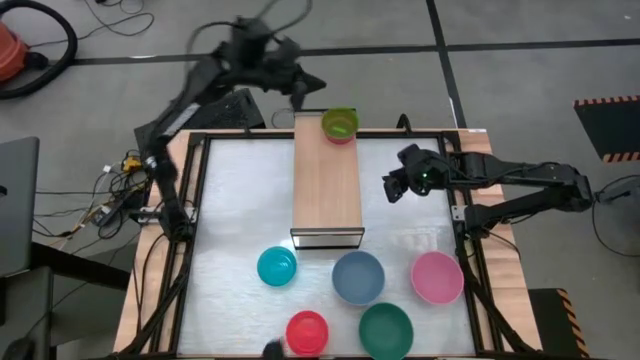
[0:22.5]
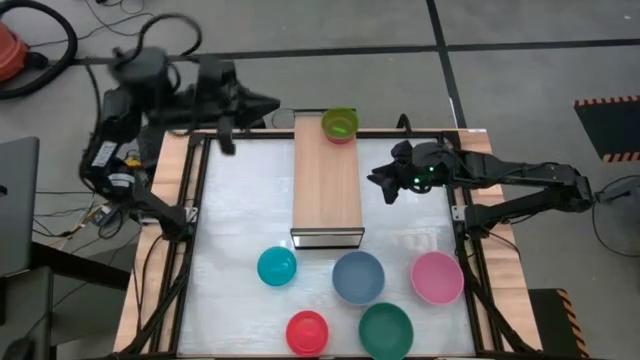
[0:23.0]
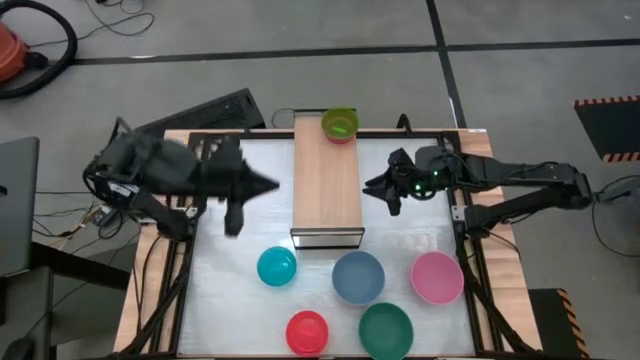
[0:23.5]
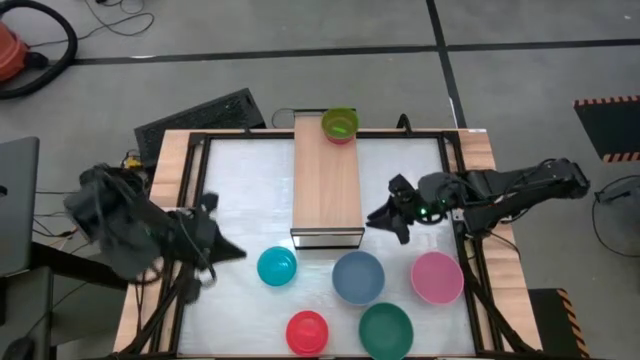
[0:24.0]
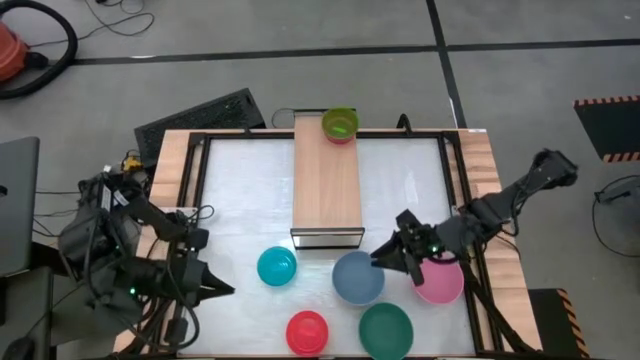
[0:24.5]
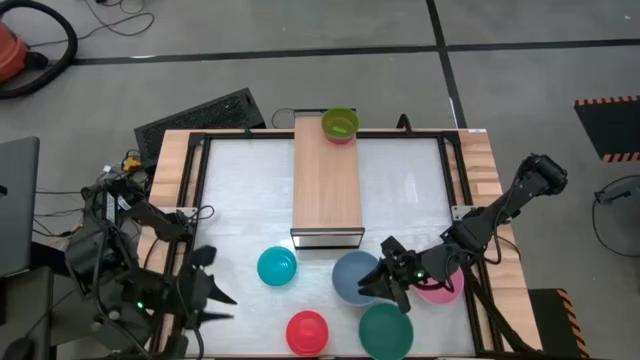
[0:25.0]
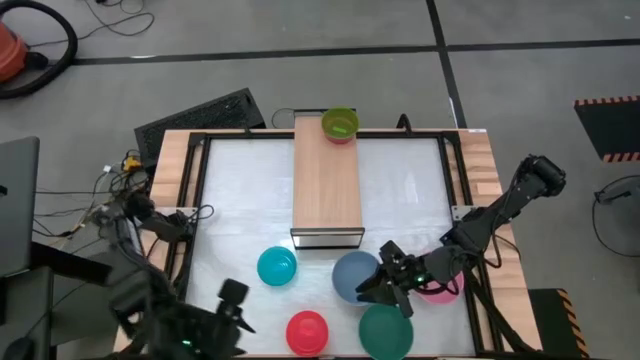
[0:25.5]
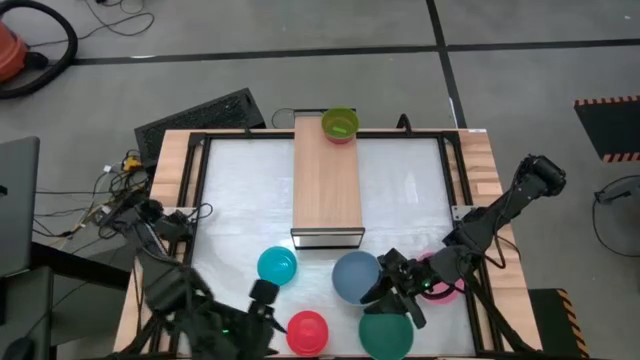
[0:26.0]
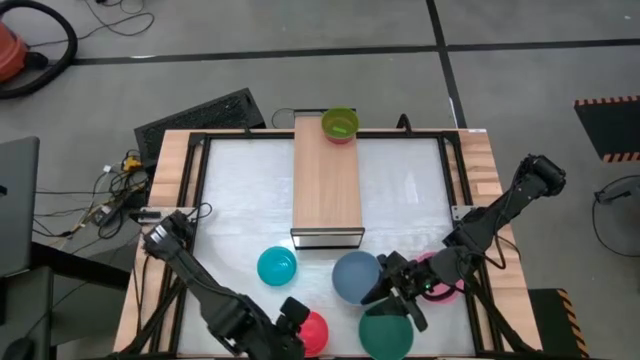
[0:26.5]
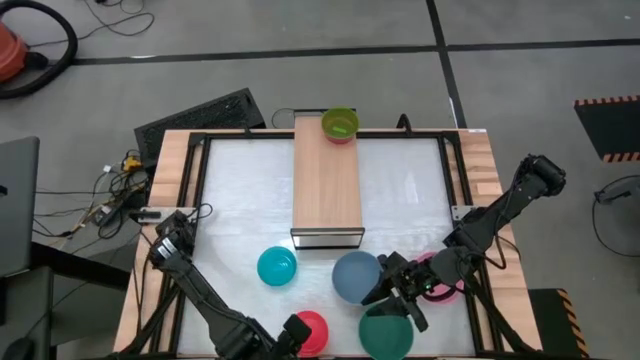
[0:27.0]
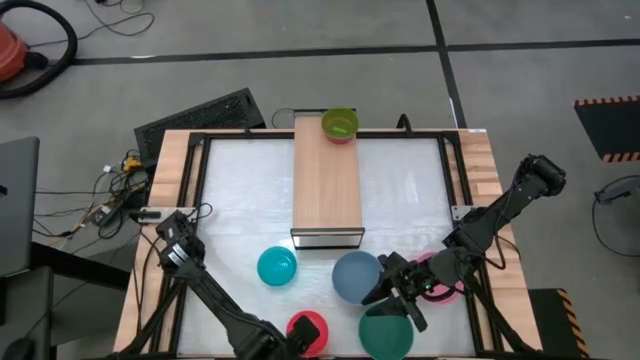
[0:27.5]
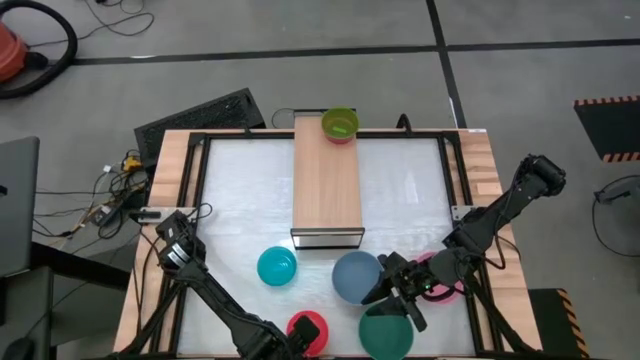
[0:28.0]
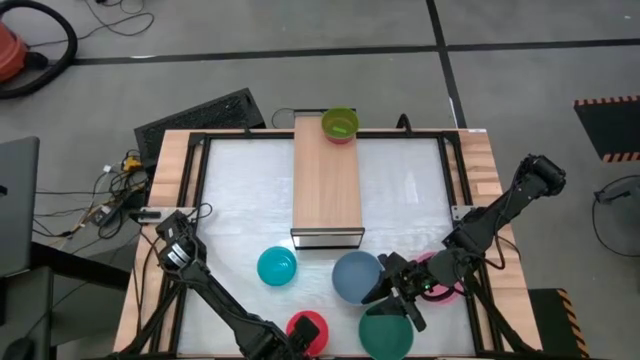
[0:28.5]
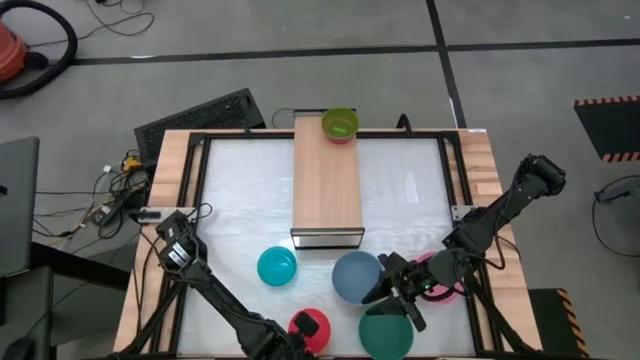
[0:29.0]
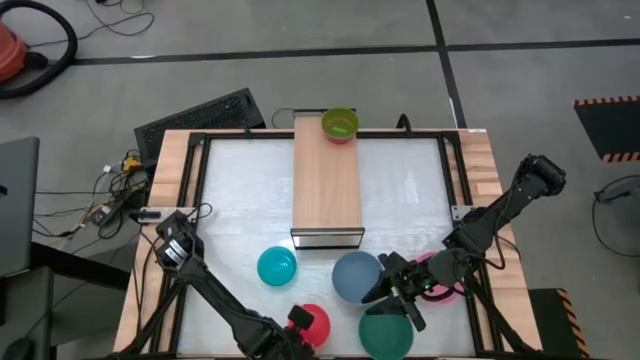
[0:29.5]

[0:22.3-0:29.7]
Task: Place and stack bowls onto a shelf
Stack the orange bowl on top of the green bowl on the shelf

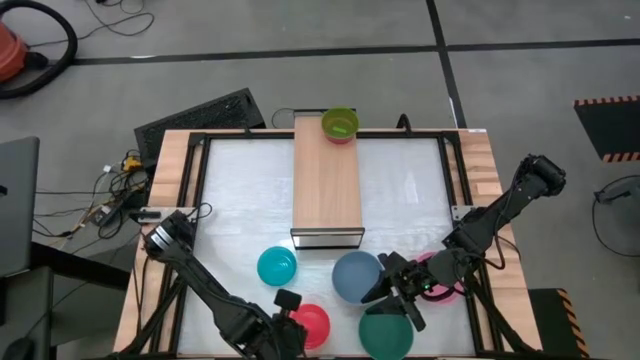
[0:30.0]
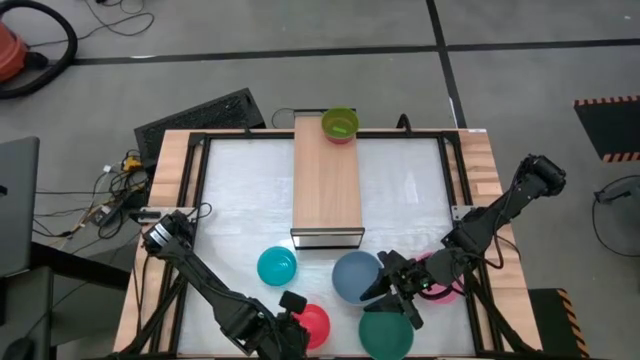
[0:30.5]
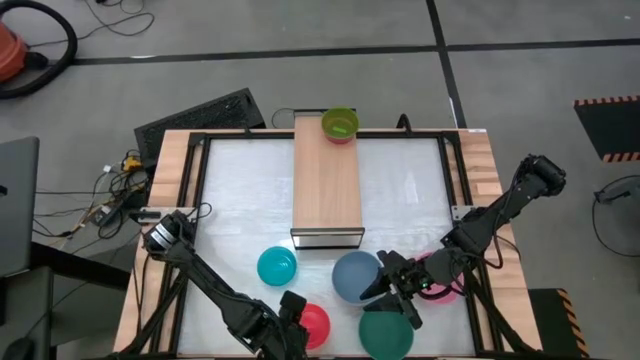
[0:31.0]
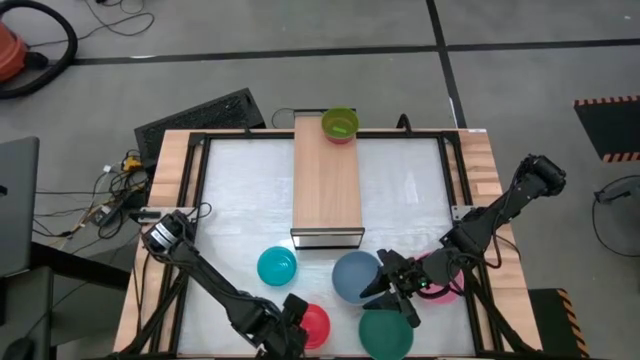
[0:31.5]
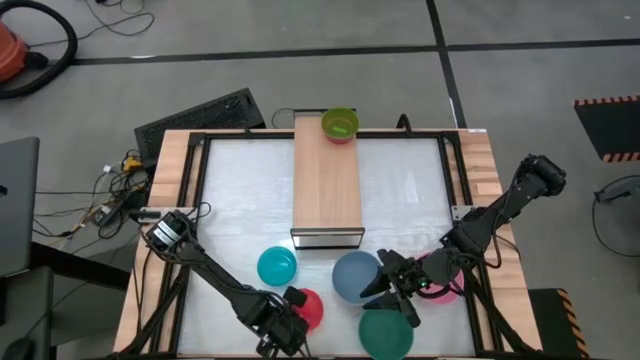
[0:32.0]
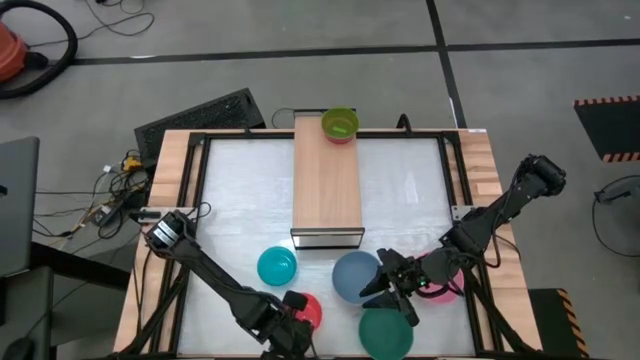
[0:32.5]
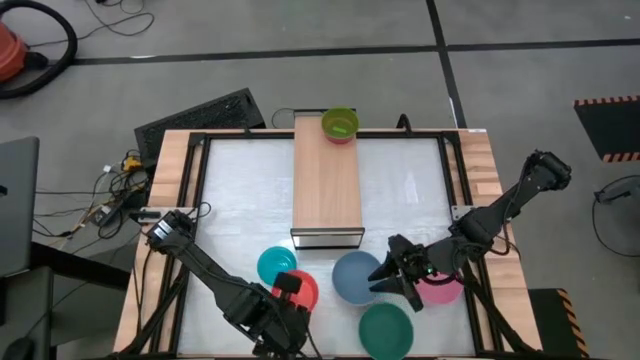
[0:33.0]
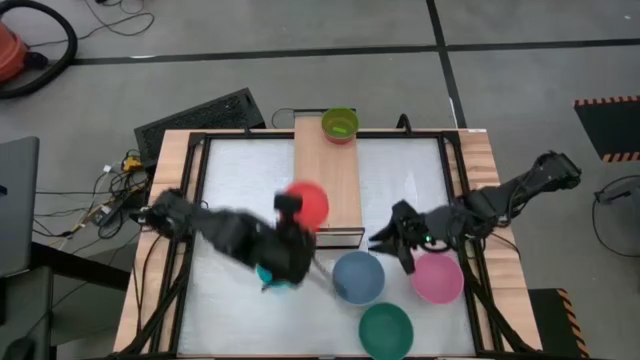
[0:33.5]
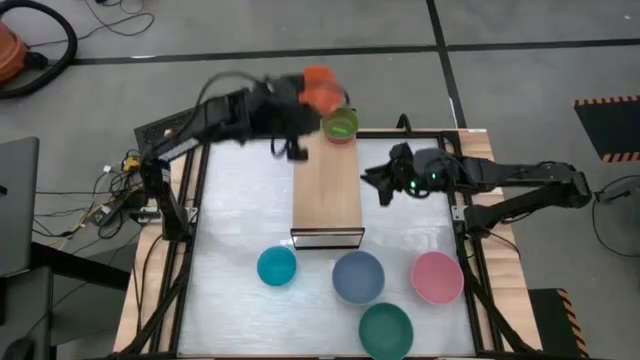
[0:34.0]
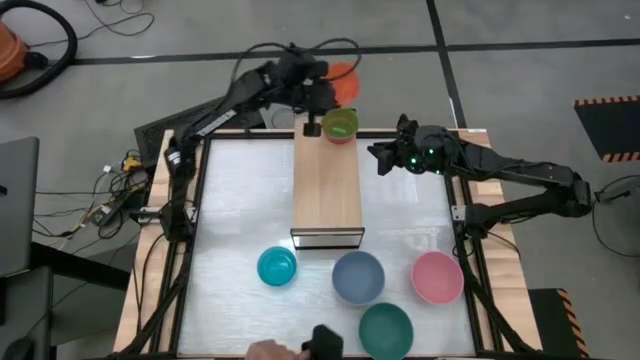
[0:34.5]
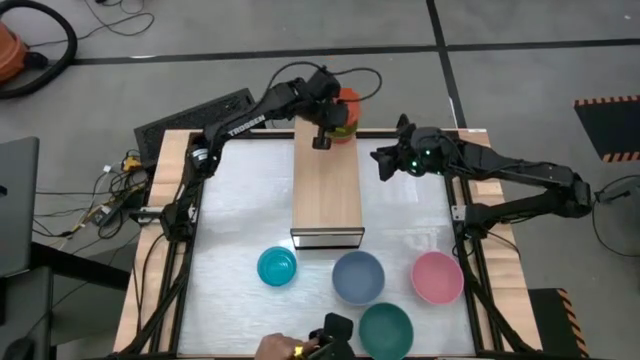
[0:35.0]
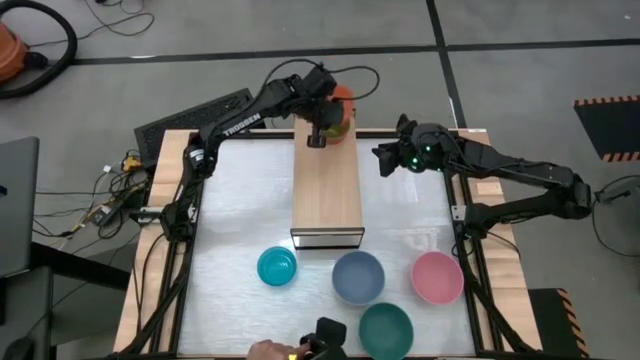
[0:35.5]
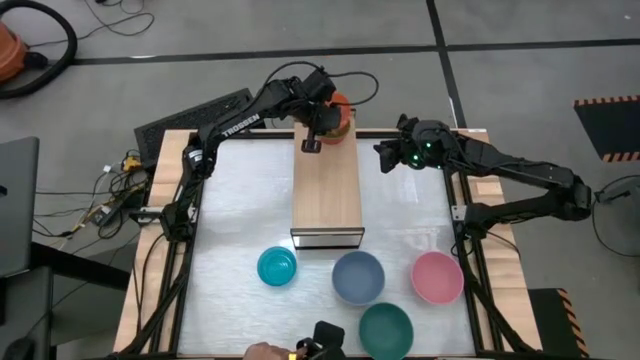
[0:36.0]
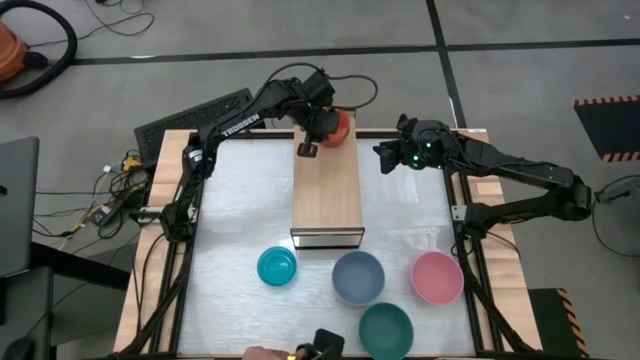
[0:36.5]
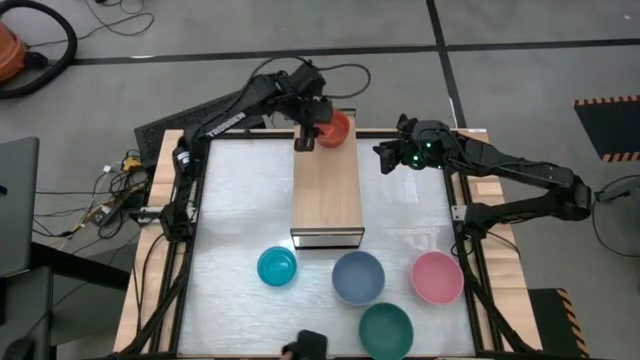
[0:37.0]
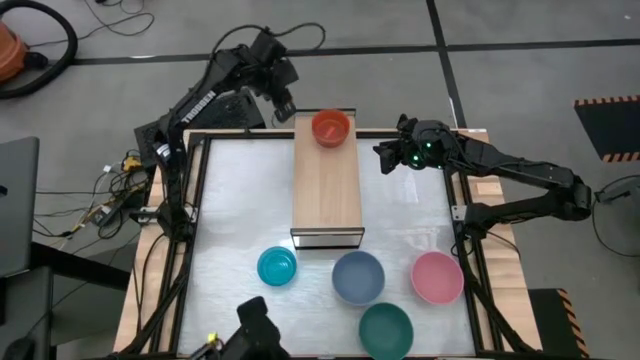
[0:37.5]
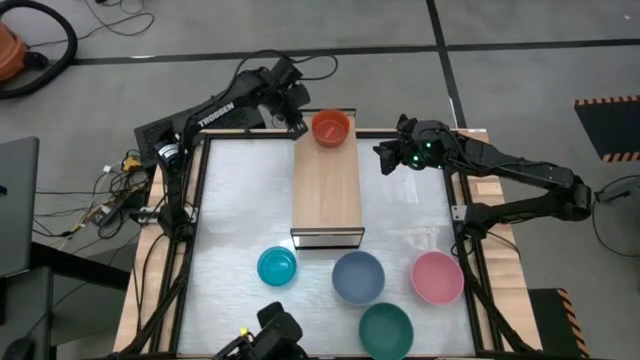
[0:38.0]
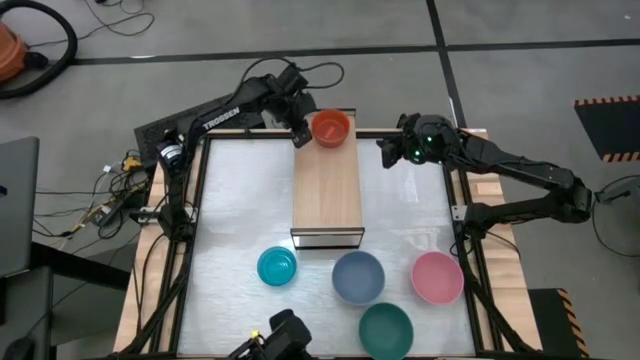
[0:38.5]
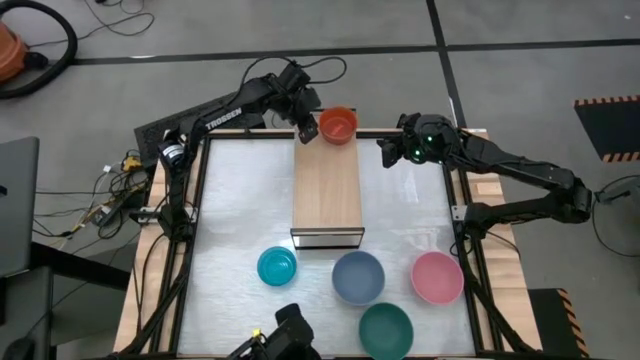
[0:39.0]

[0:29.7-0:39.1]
Stack the orange bowl on top of the green bowl on the shelf

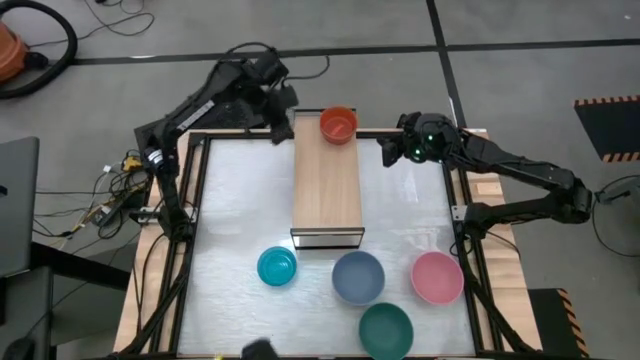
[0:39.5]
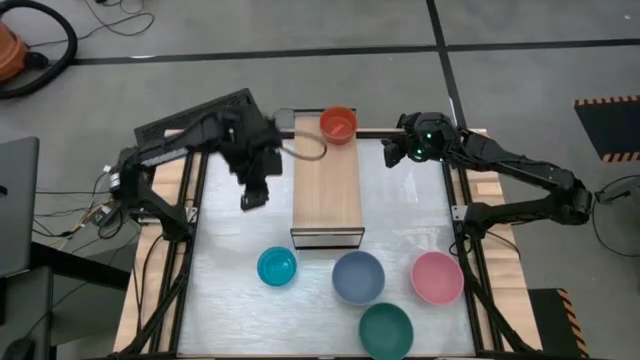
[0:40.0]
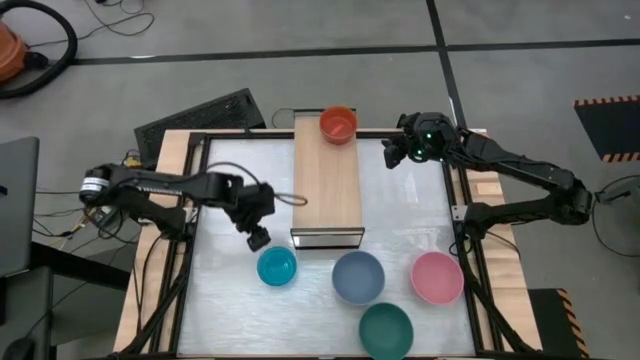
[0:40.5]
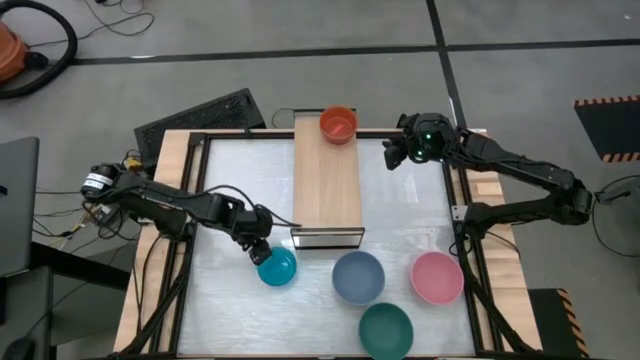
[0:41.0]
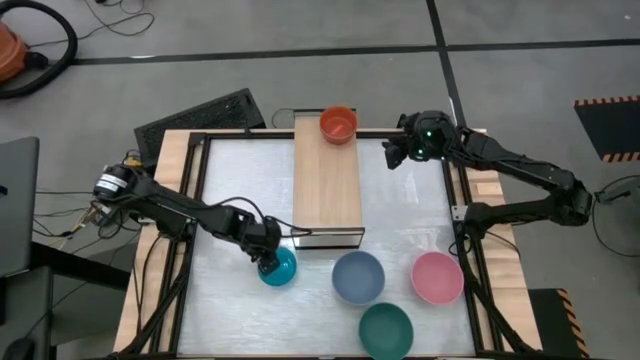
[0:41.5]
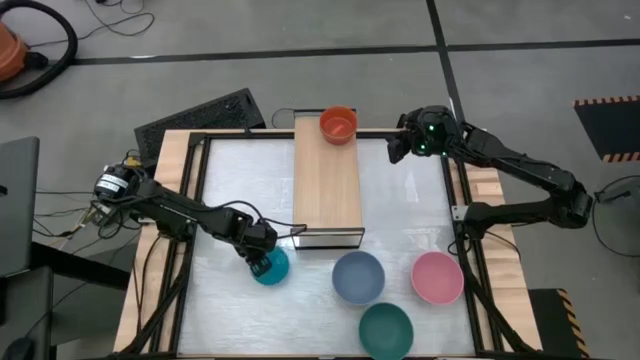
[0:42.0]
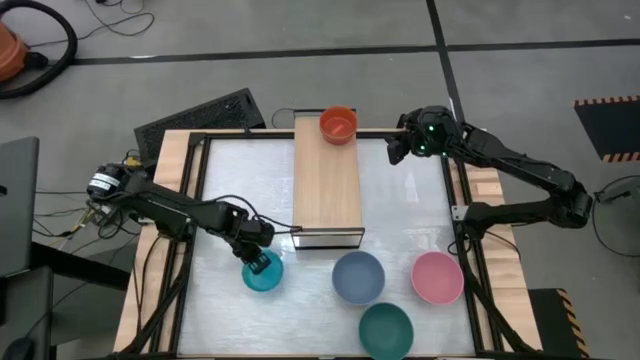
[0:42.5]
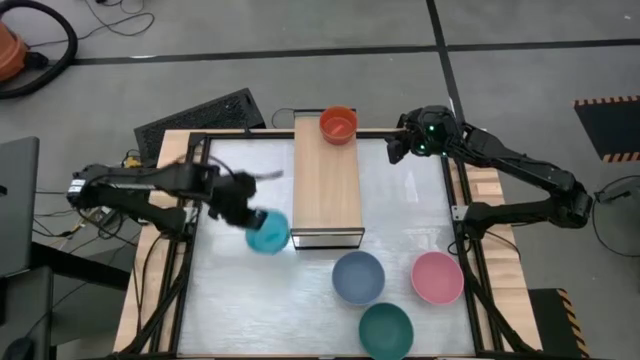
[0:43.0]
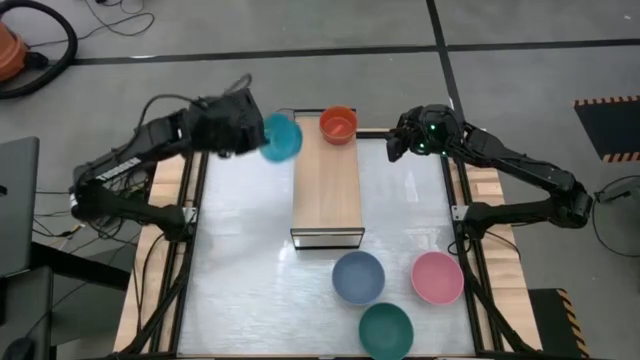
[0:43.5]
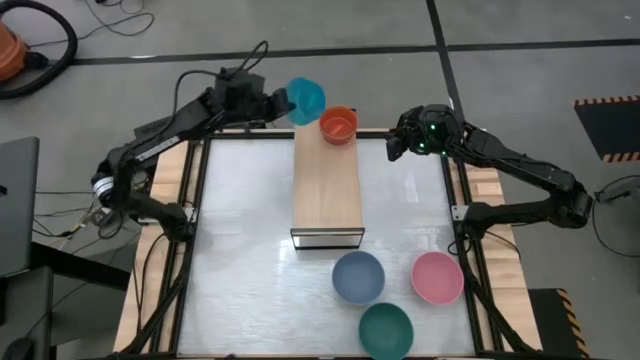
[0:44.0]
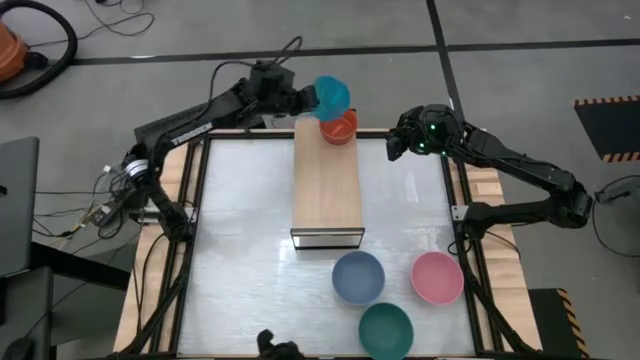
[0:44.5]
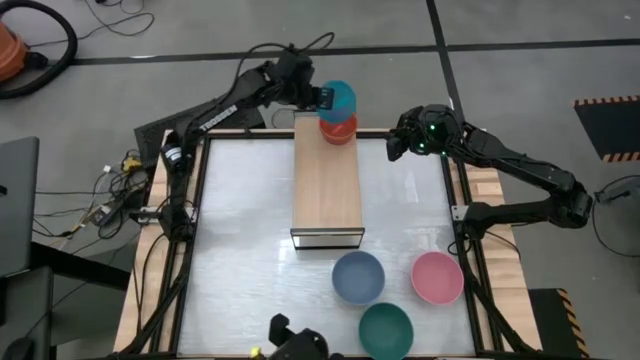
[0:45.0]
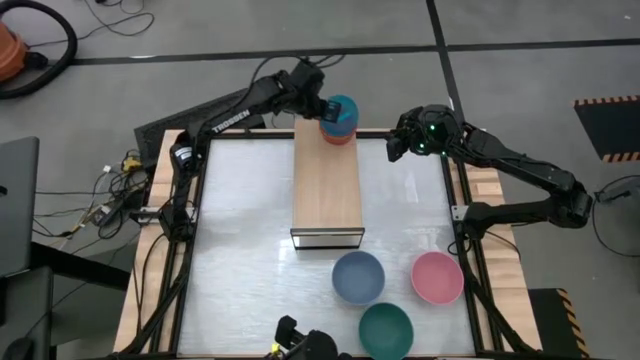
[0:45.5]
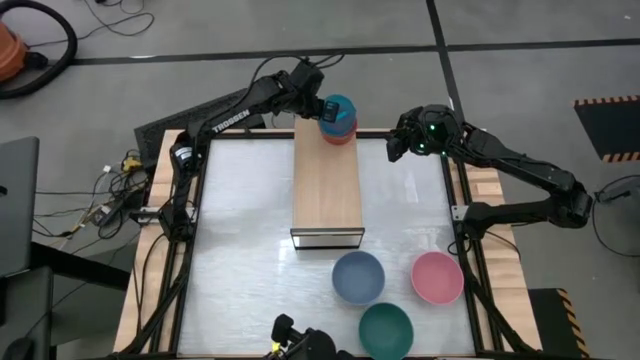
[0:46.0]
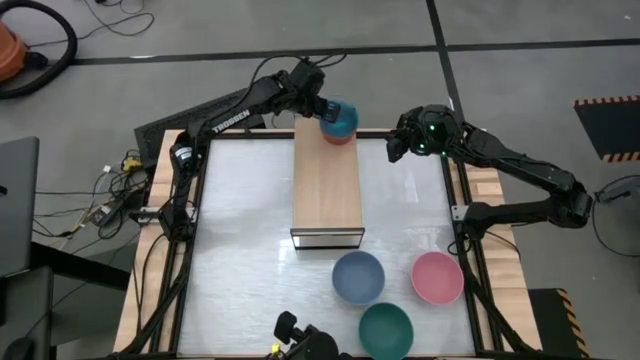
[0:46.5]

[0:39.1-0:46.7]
Stack the blue bowl on top of the orange bowl on the shelf
